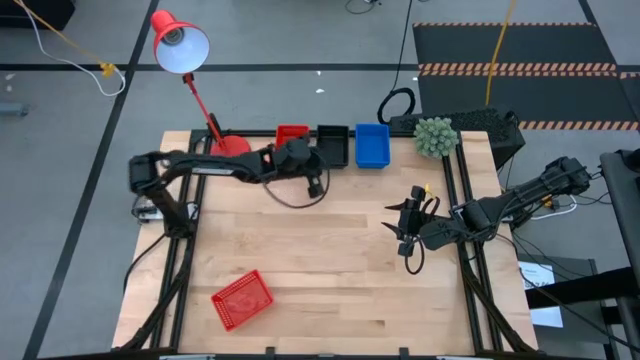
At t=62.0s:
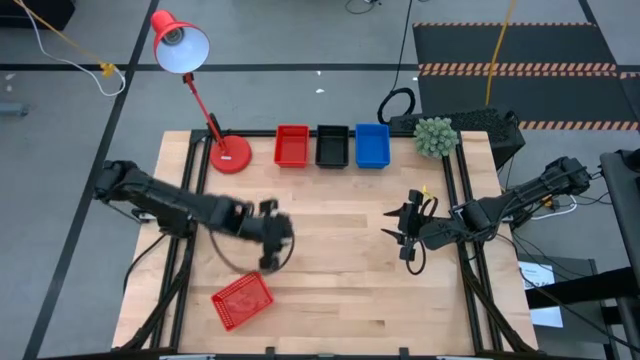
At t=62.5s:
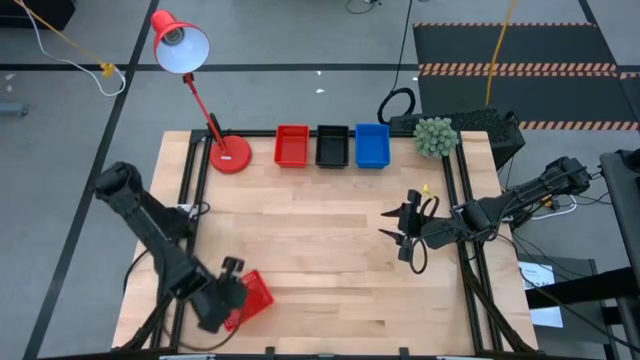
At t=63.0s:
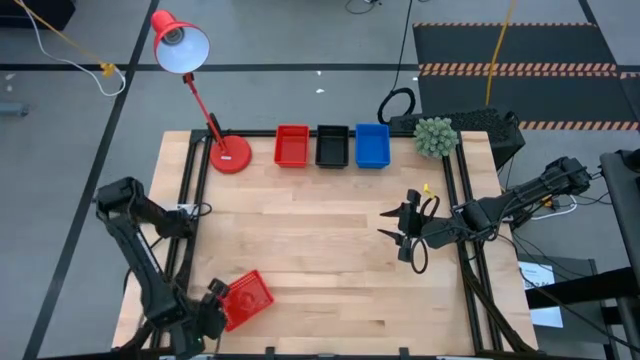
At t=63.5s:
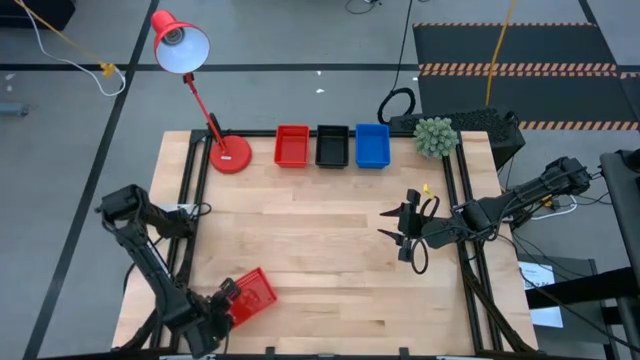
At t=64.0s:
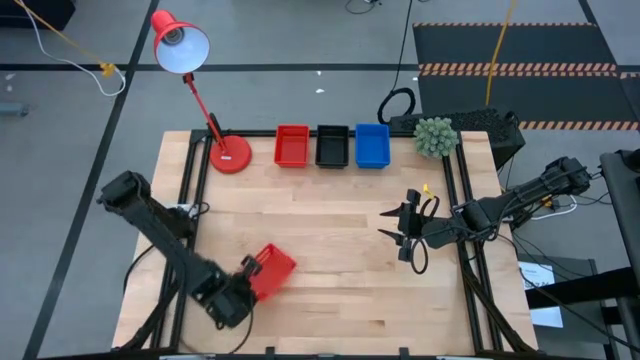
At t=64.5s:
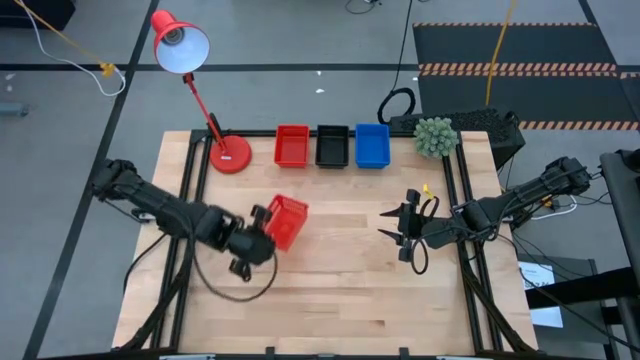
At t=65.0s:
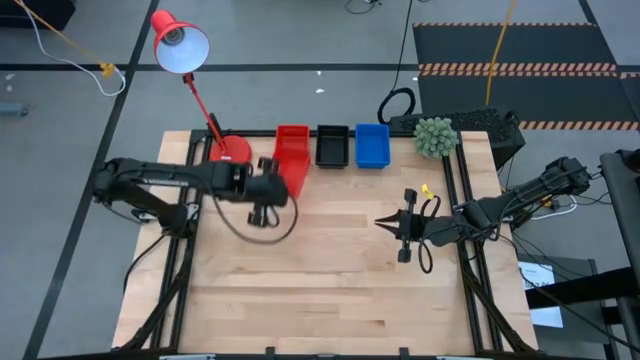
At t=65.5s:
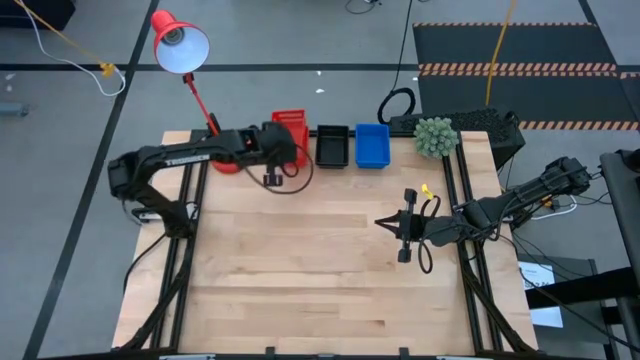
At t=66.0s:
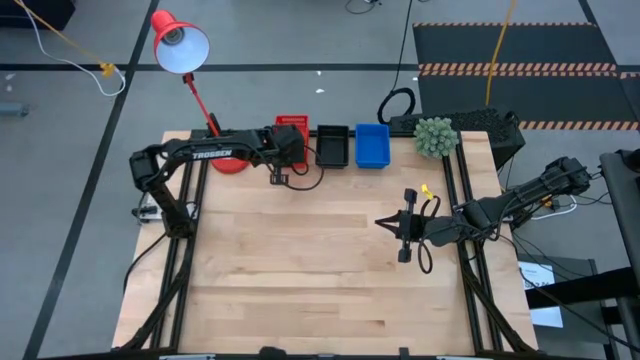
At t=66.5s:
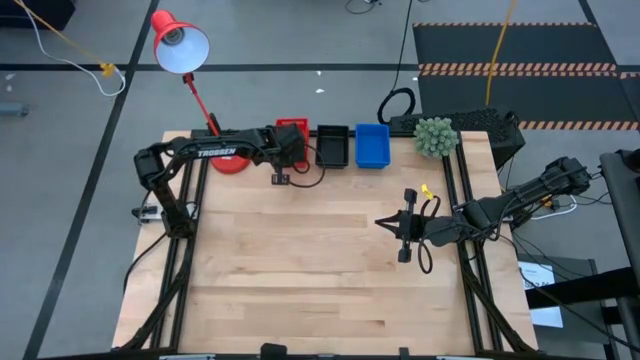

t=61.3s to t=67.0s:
Stack the bottom red bin on the top stacked red bins

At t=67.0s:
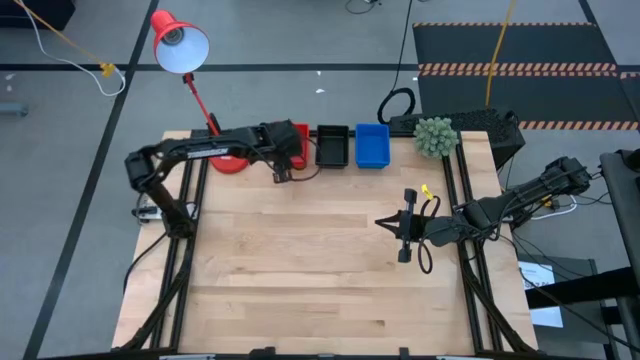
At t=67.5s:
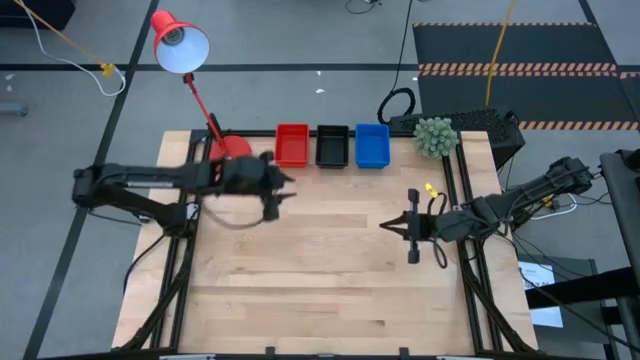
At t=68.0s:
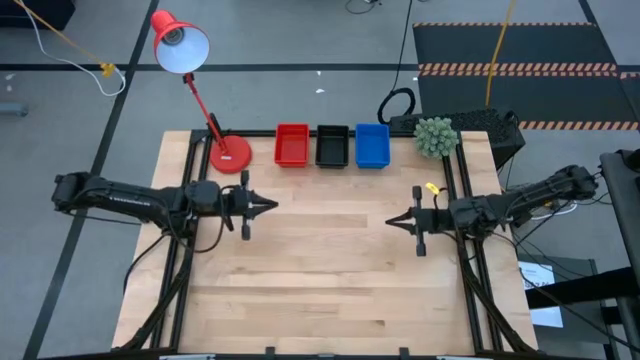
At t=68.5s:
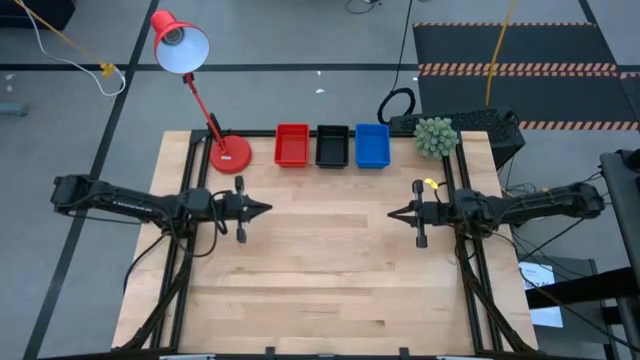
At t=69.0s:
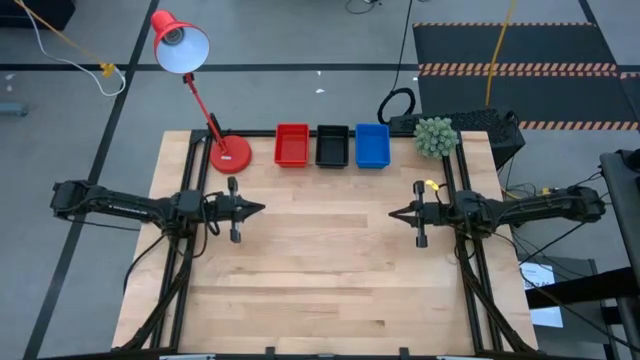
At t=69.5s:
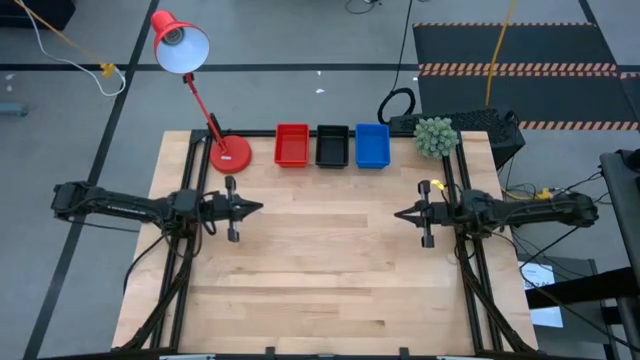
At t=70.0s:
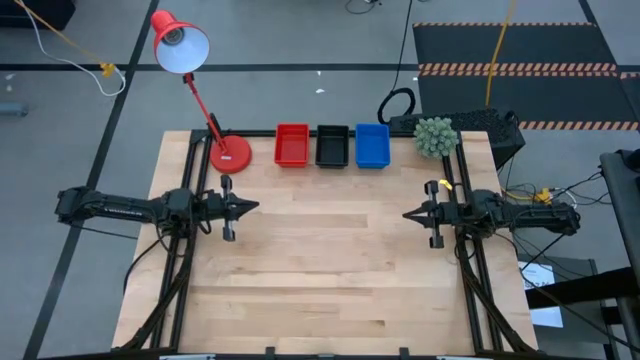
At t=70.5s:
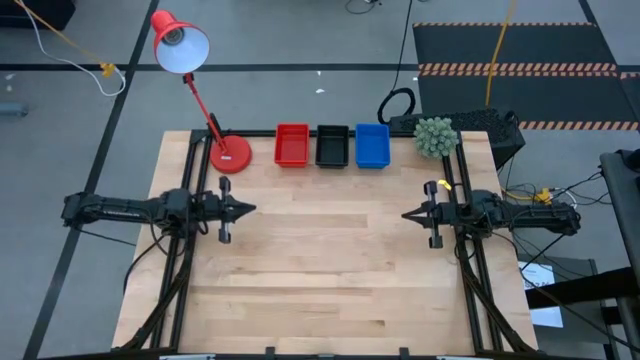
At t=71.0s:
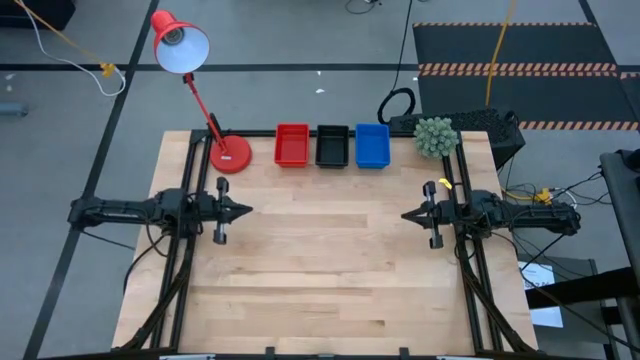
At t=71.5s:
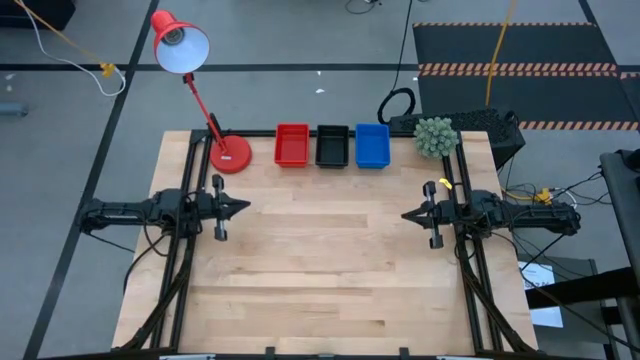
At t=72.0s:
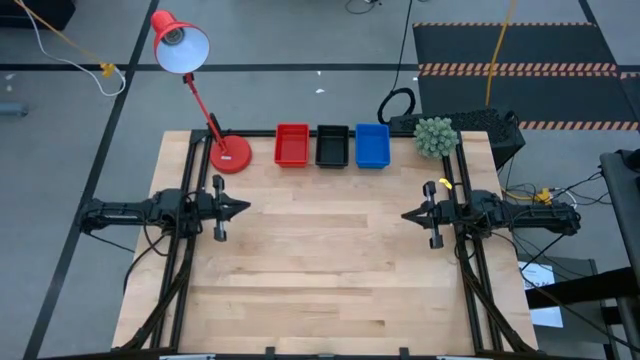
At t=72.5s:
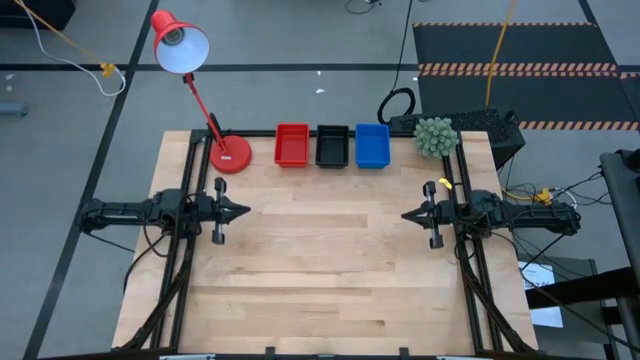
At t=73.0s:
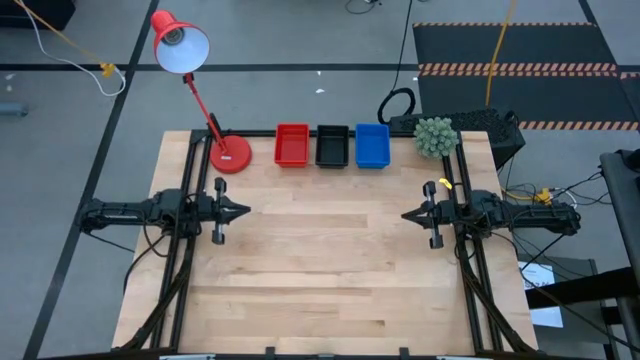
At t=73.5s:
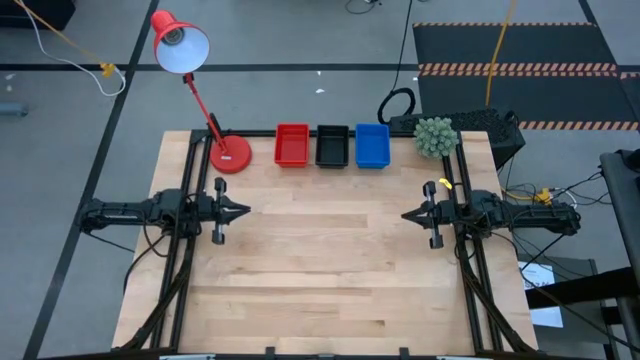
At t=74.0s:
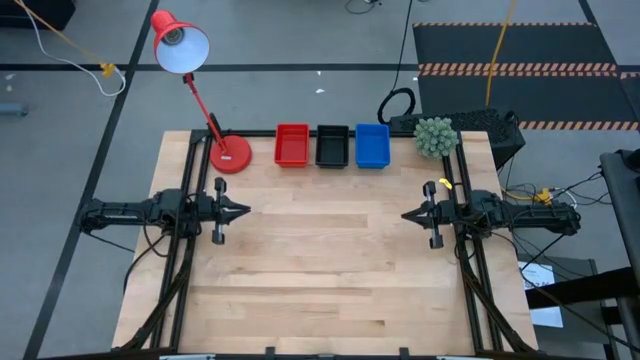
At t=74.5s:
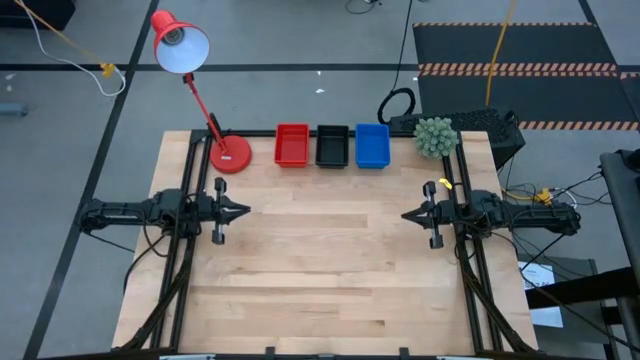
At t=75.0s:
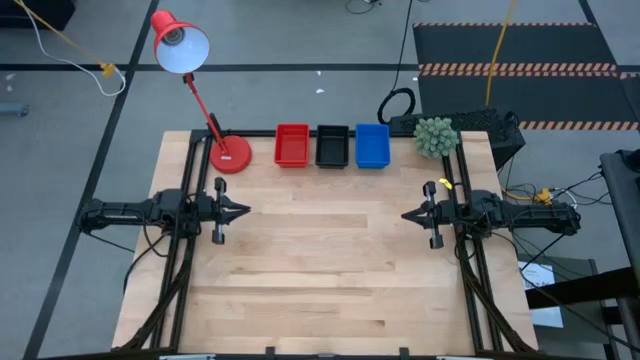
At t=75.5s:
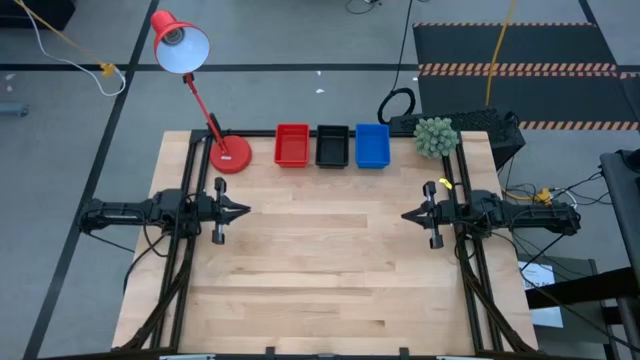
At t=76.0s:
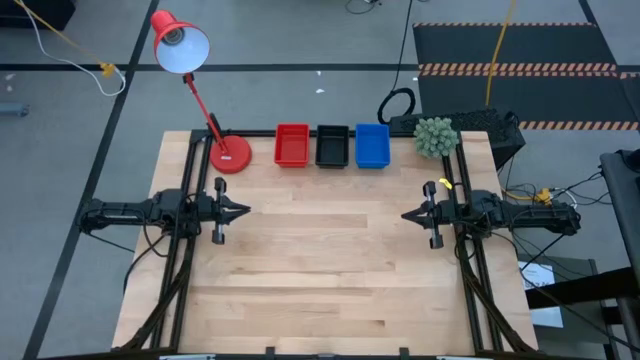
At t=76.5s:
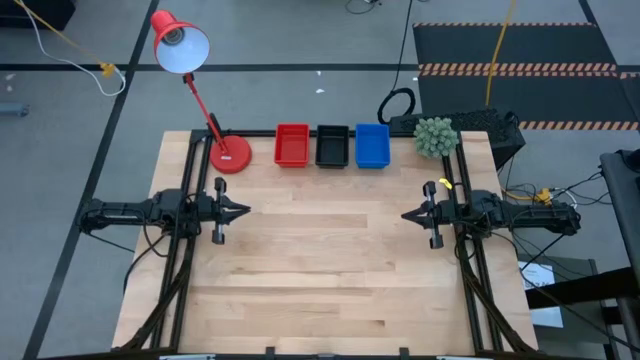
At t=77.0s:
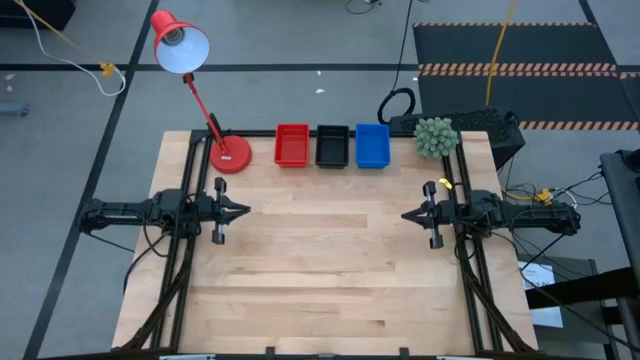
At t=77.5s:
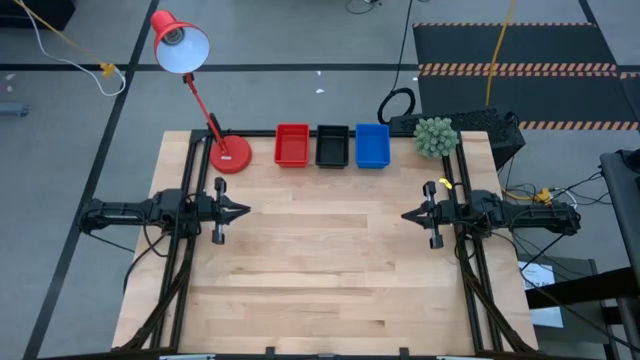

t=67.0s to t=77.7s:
Return to Home Position
